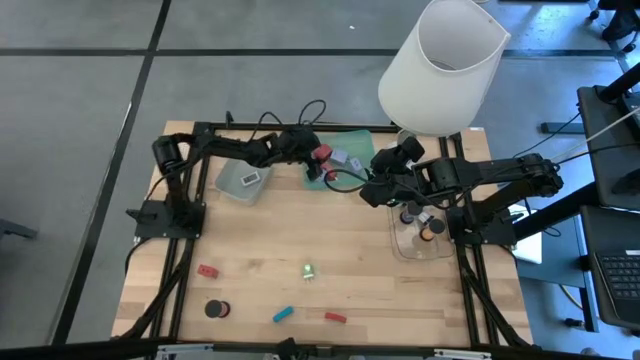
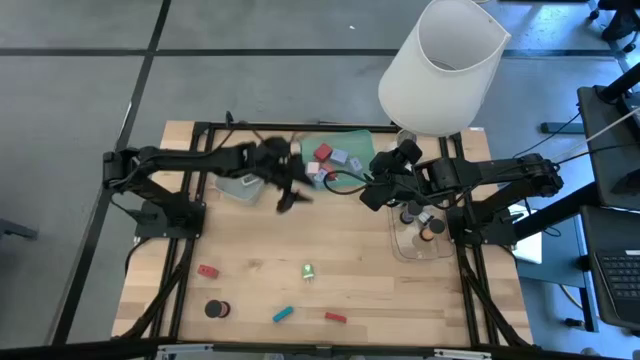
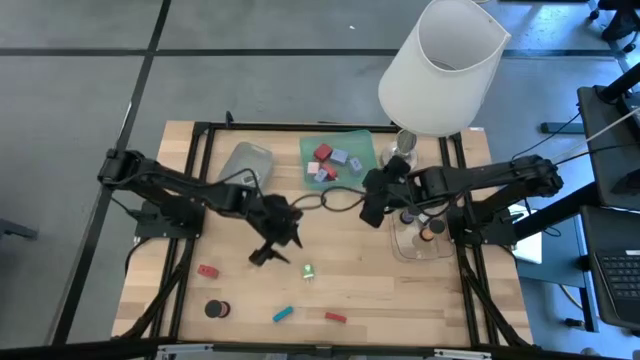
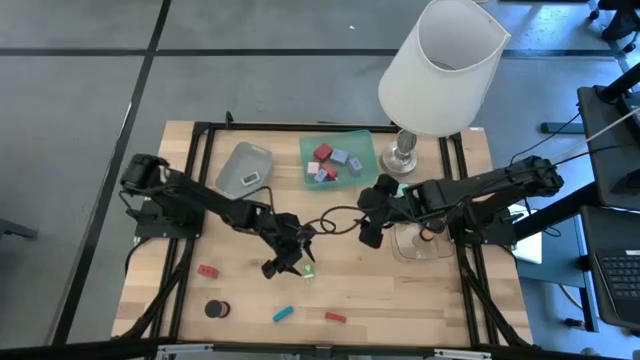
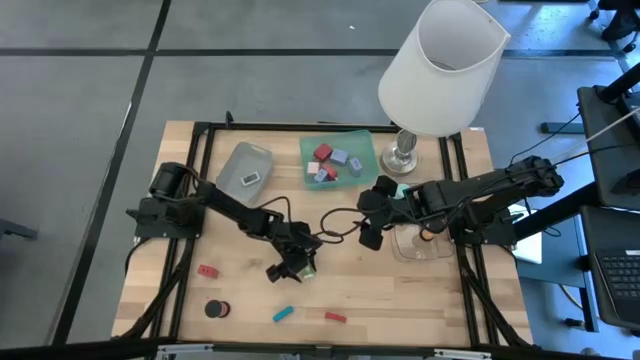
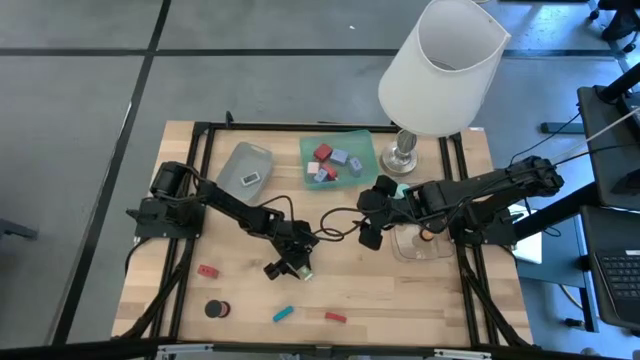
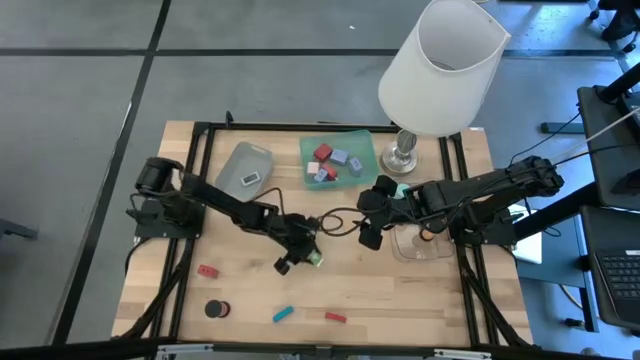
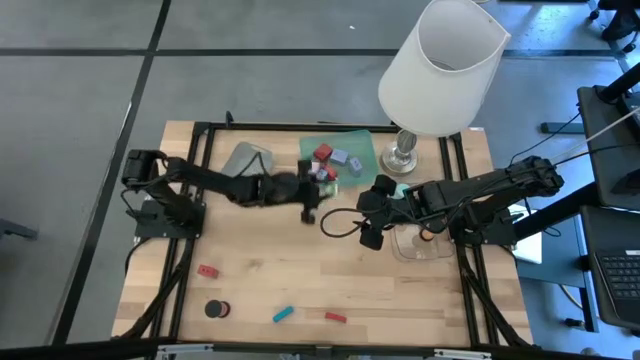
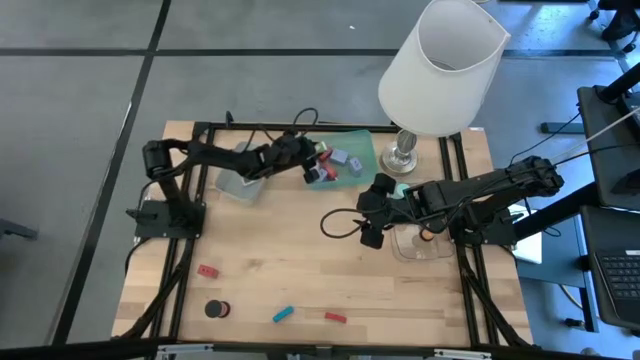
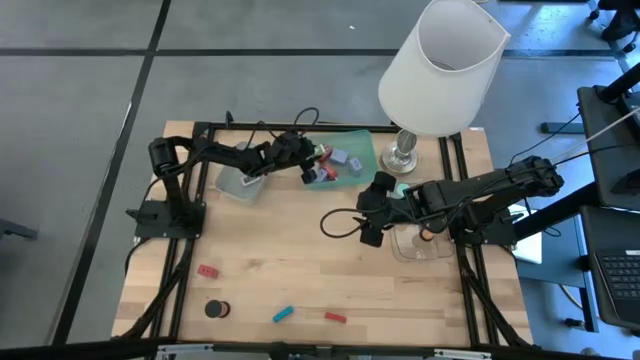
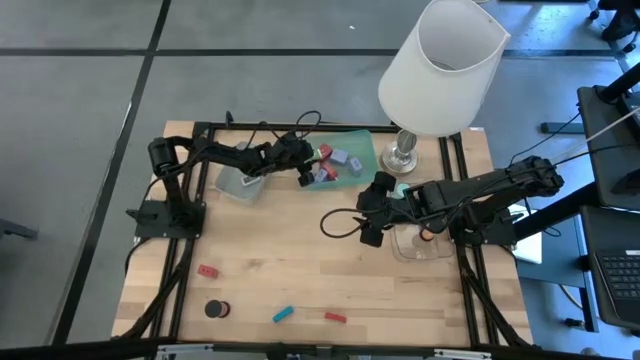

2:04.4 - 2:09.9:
Task: Pick & Place Office items
Put the green charger adapter into the green bin

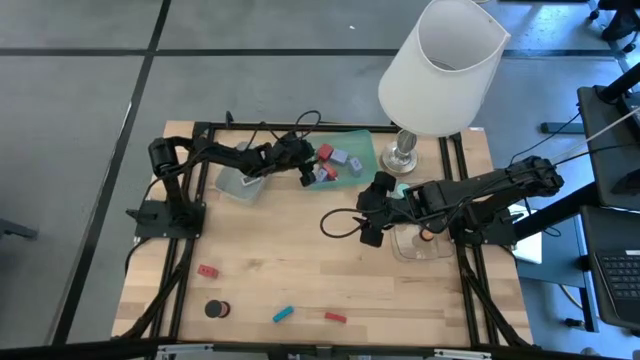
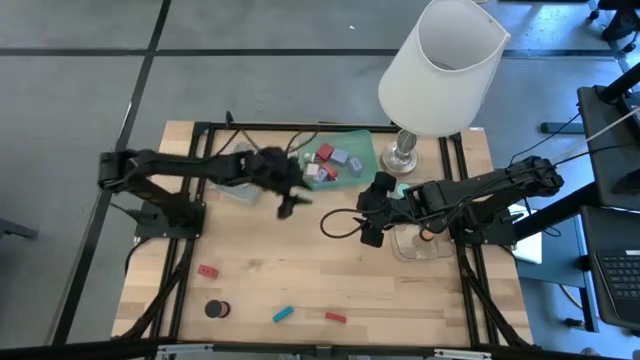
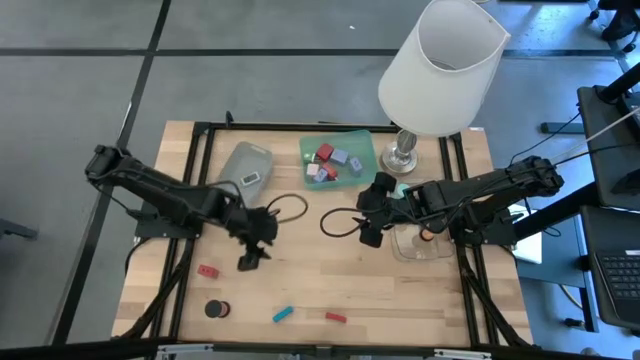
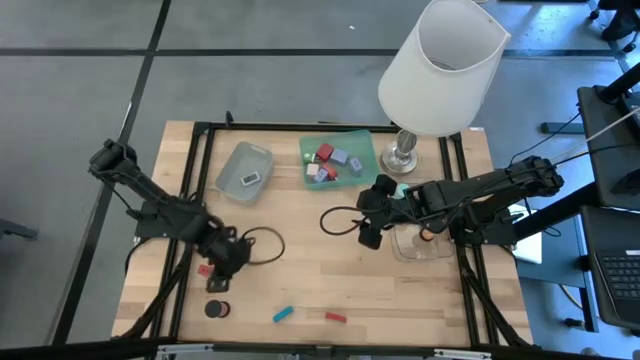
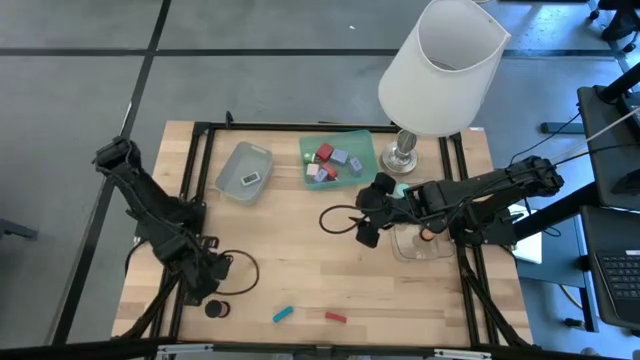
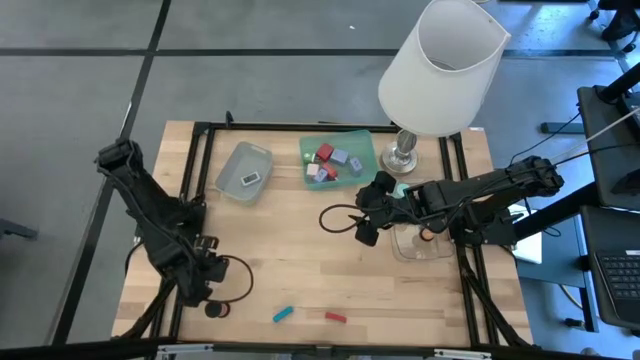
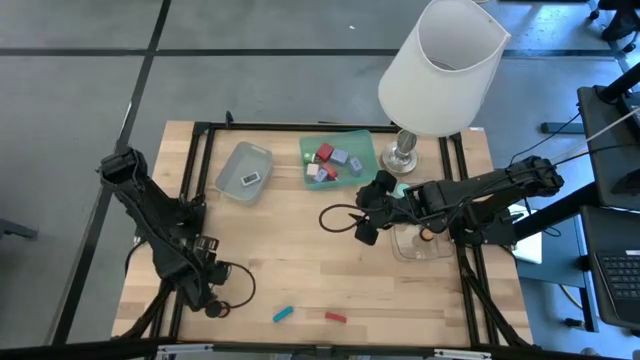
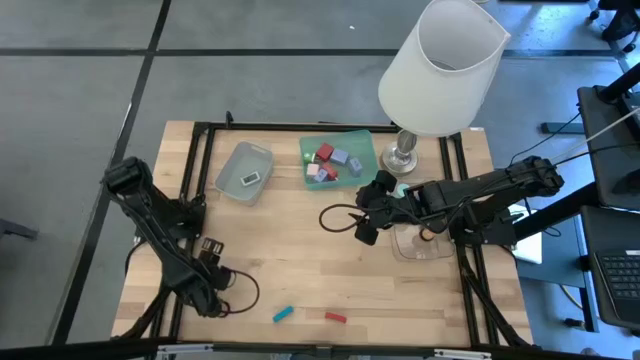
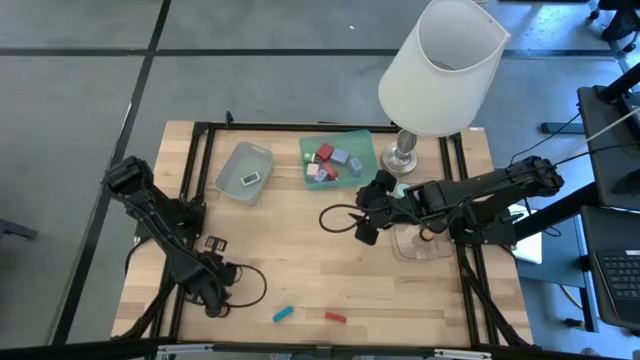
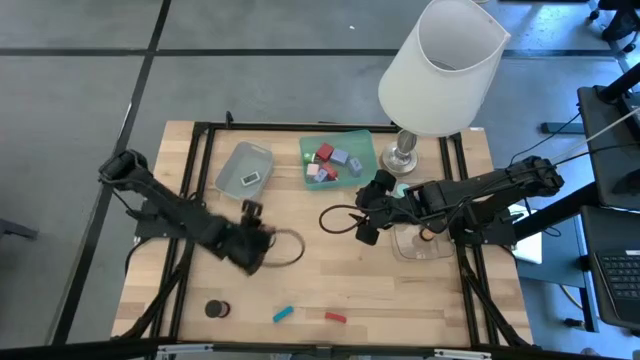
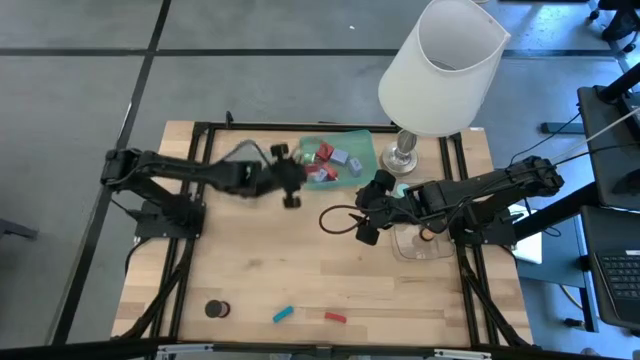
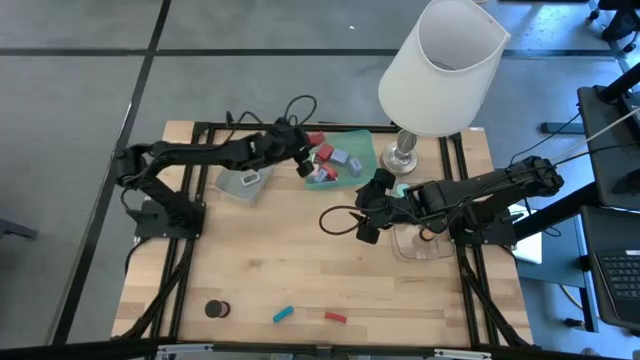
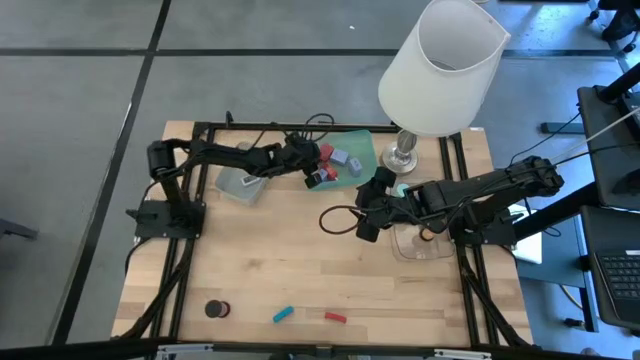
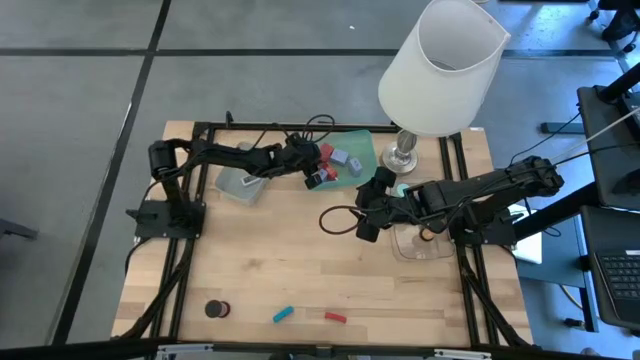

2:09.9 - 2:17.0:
Put the red charger adapter into the green bin

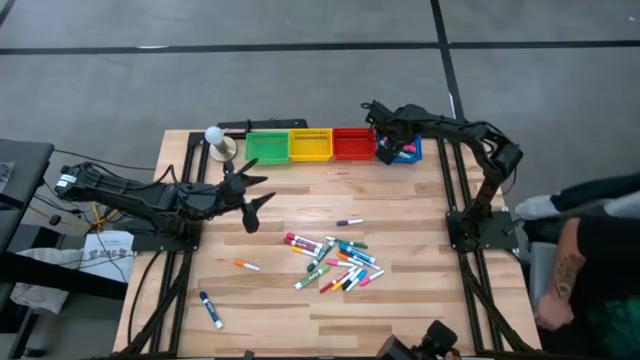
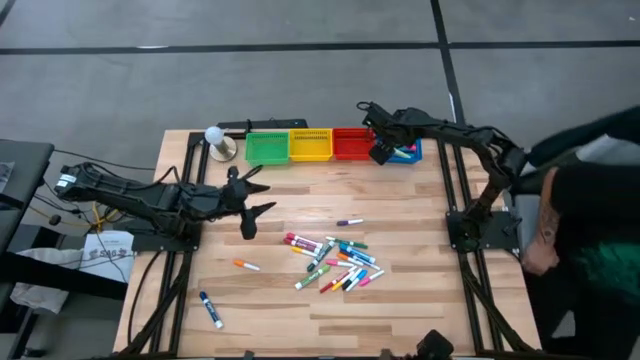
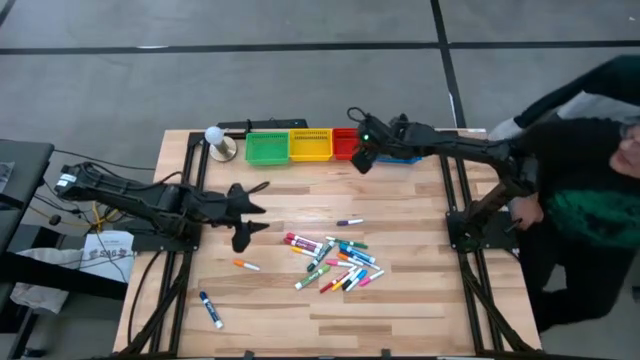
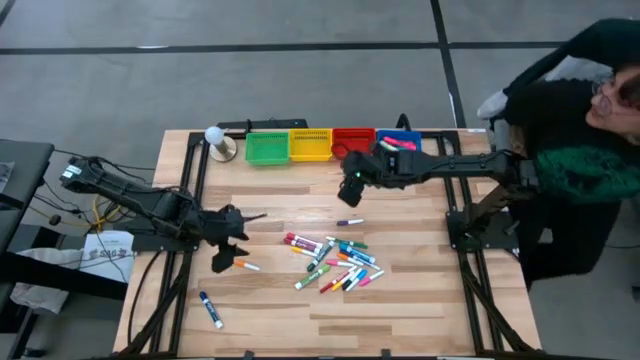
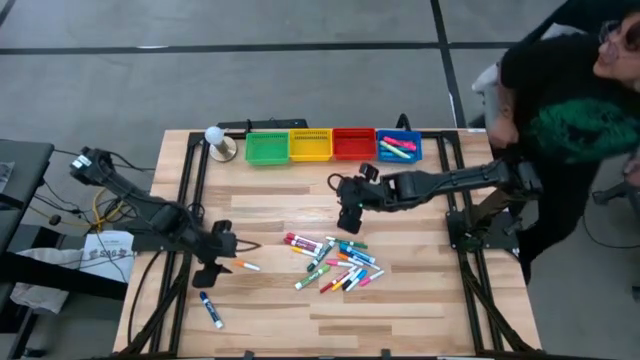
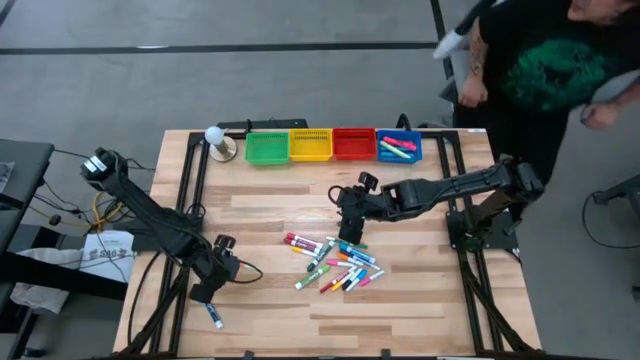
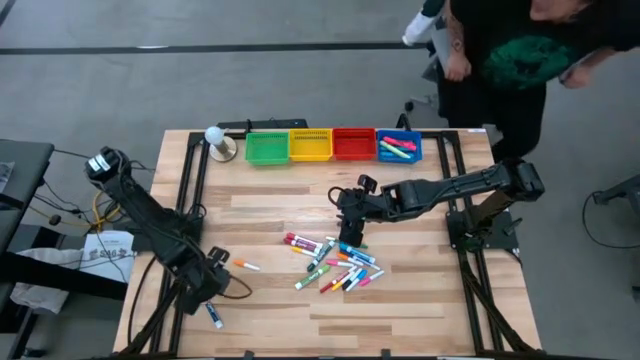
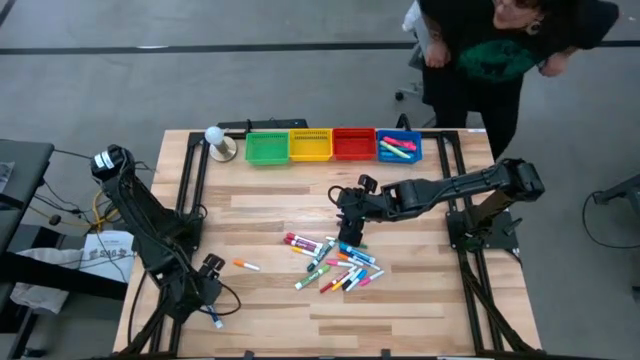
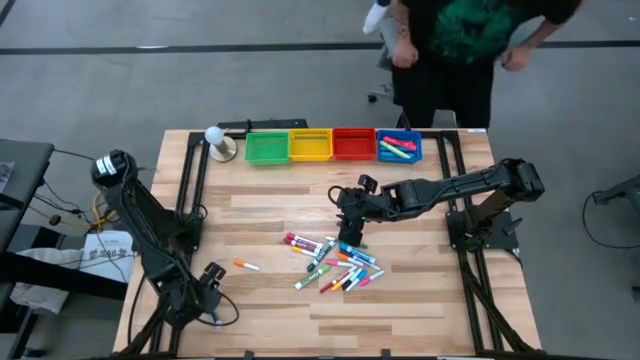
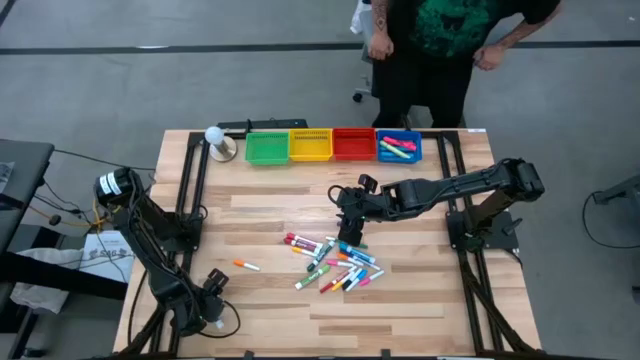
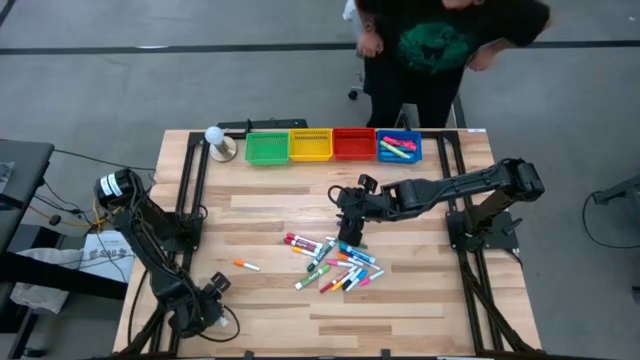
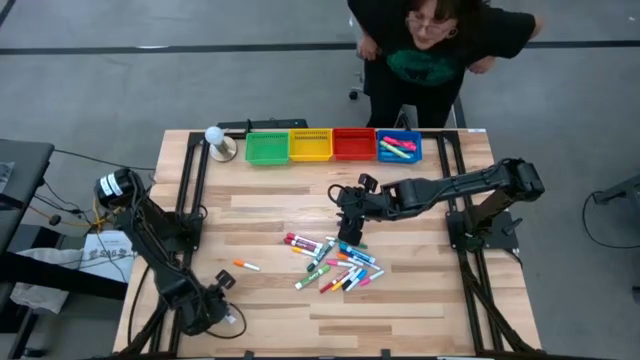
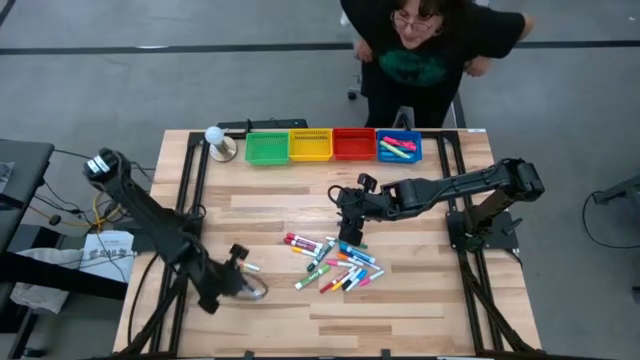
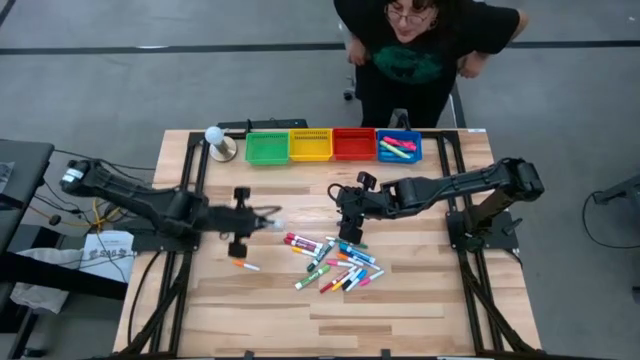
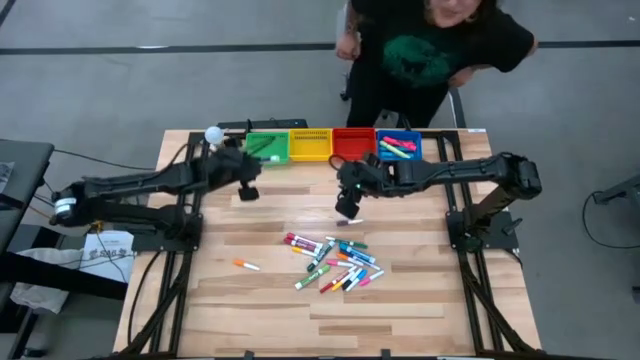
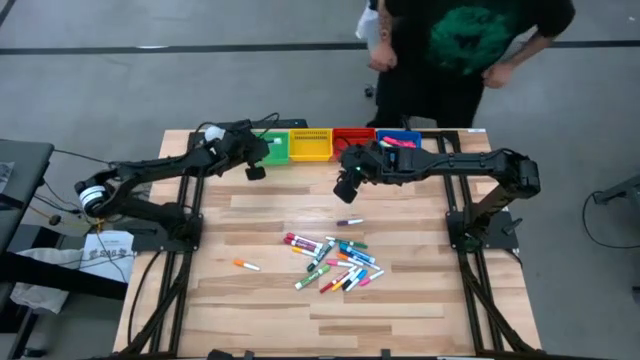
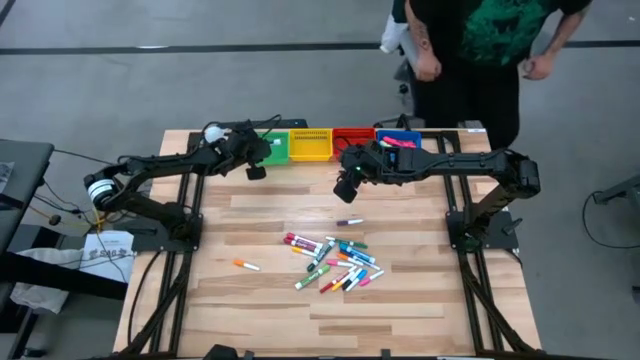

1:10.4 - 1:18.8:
Task: Pick & Place Markers
Put the blue marker pen into the green basket
